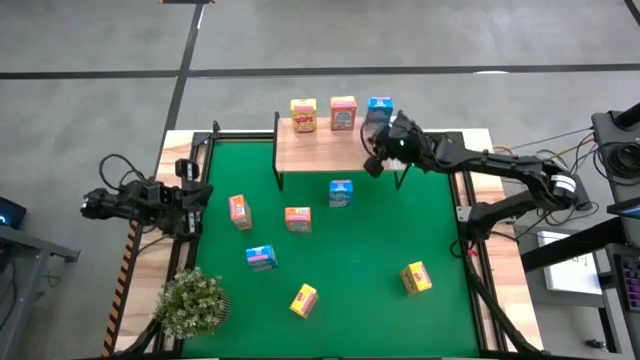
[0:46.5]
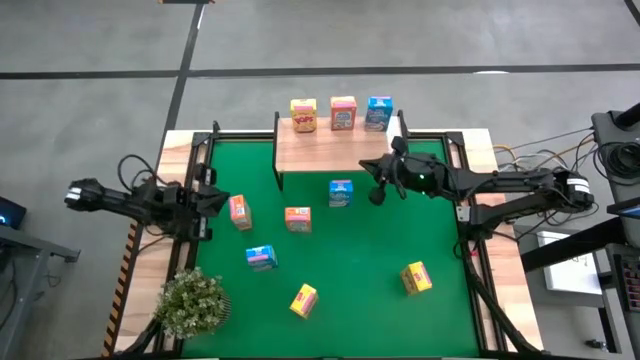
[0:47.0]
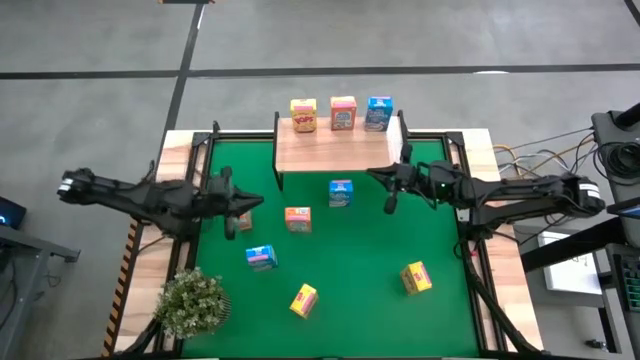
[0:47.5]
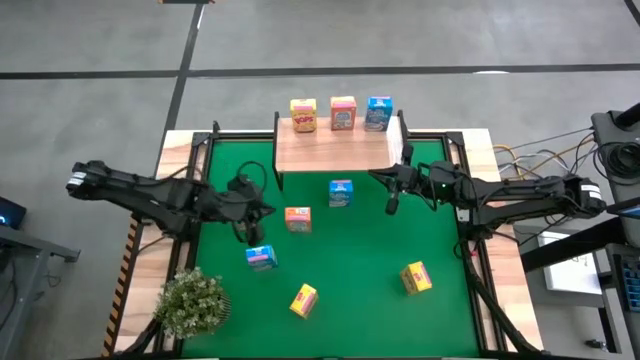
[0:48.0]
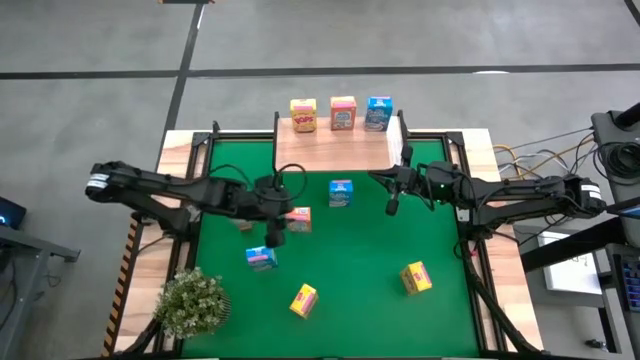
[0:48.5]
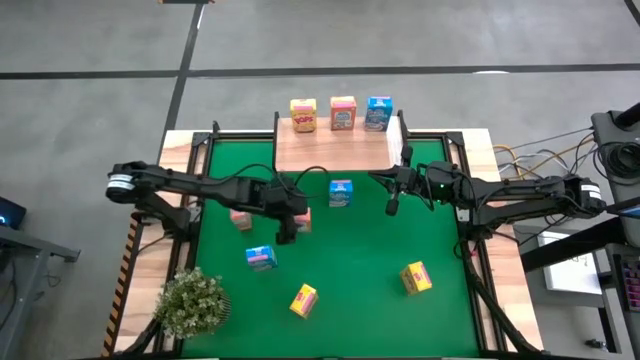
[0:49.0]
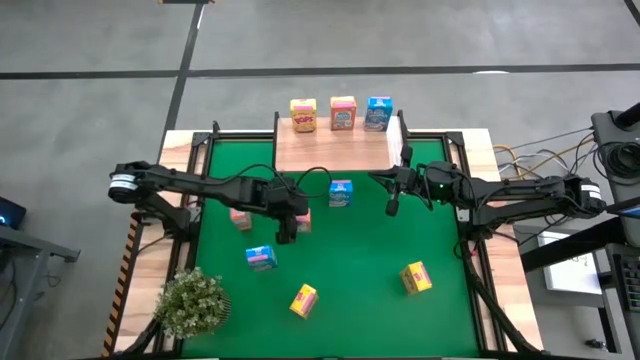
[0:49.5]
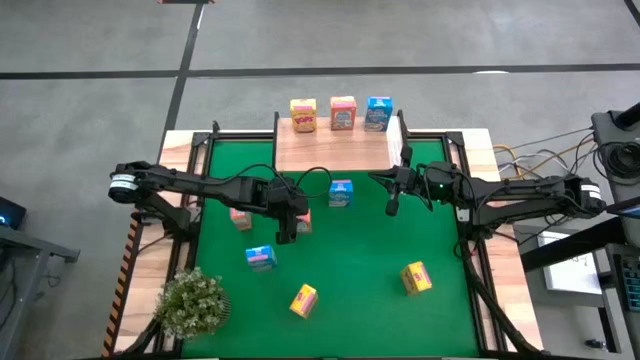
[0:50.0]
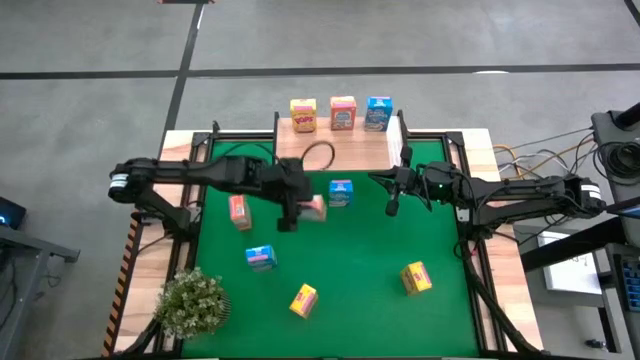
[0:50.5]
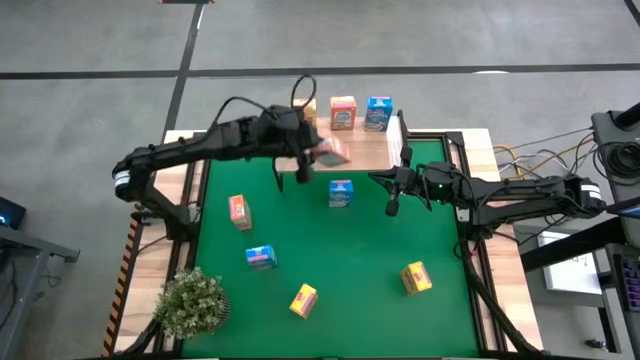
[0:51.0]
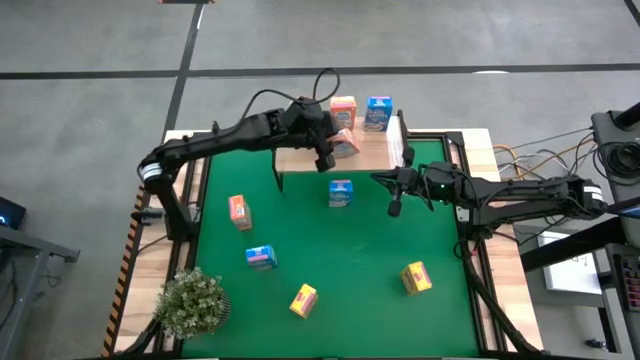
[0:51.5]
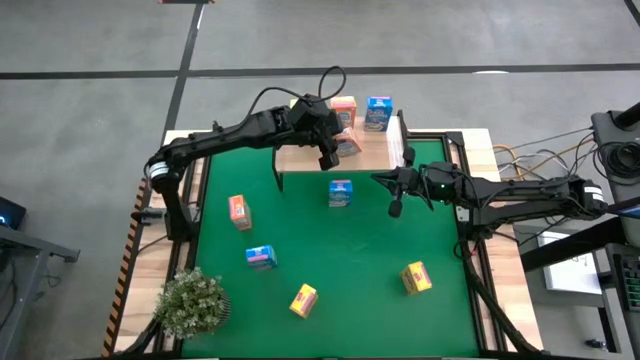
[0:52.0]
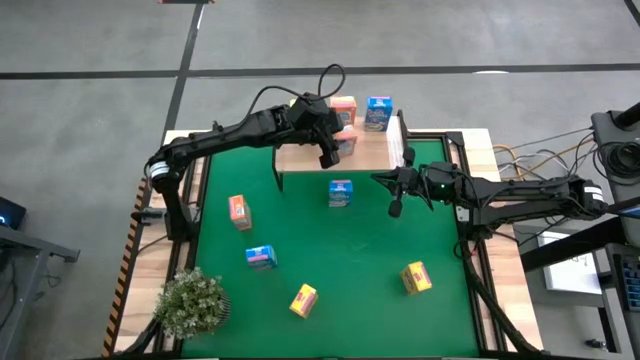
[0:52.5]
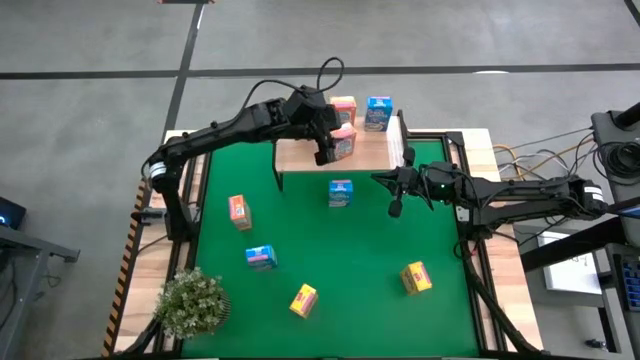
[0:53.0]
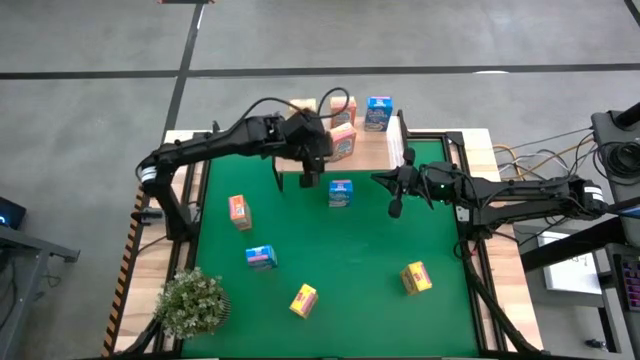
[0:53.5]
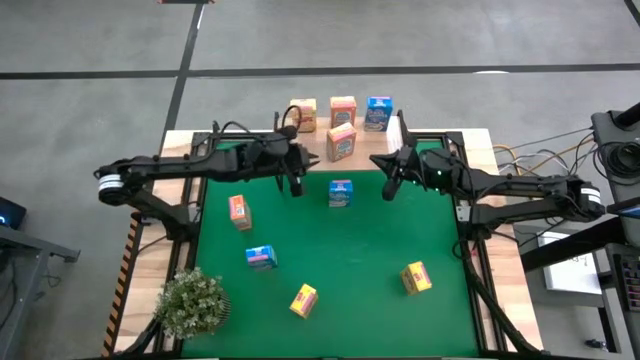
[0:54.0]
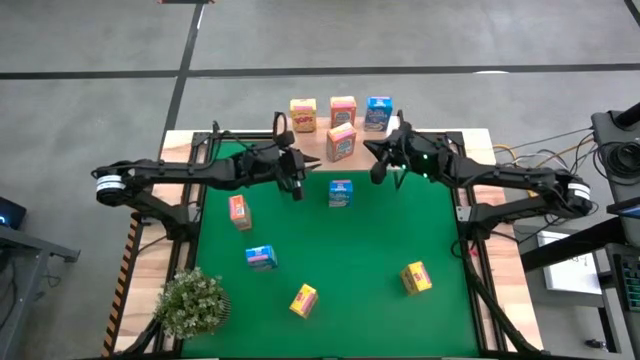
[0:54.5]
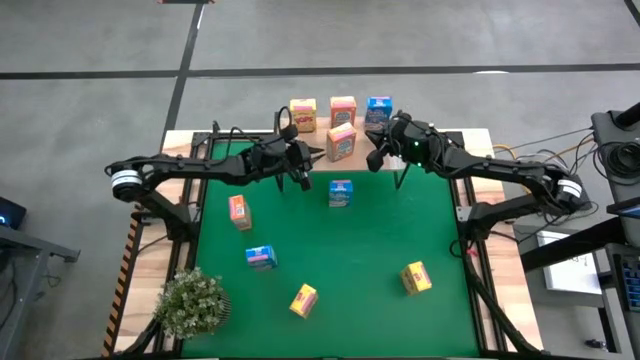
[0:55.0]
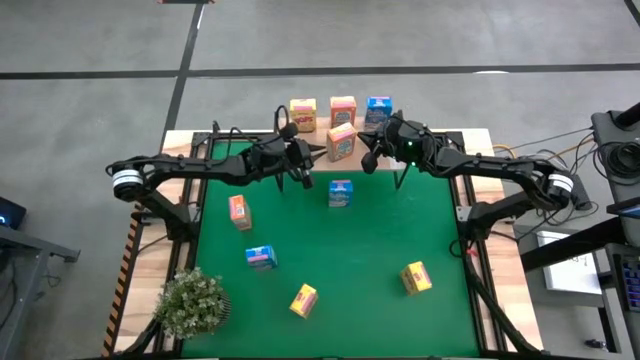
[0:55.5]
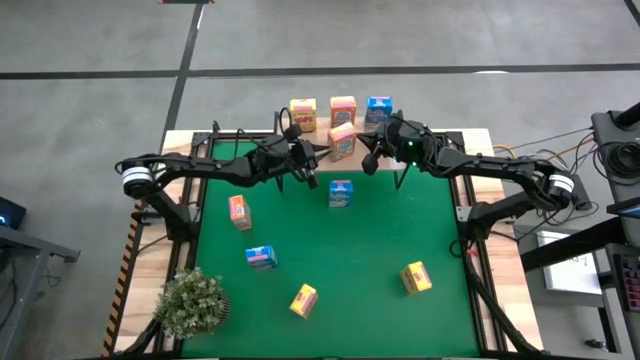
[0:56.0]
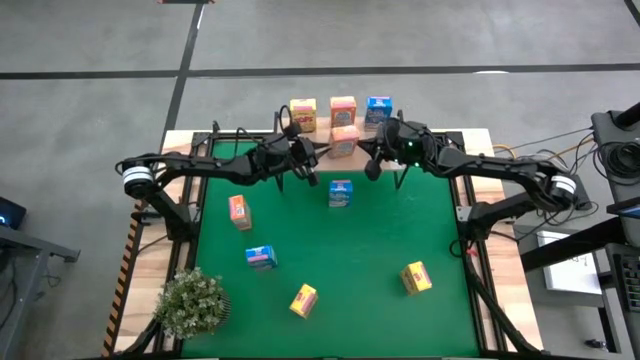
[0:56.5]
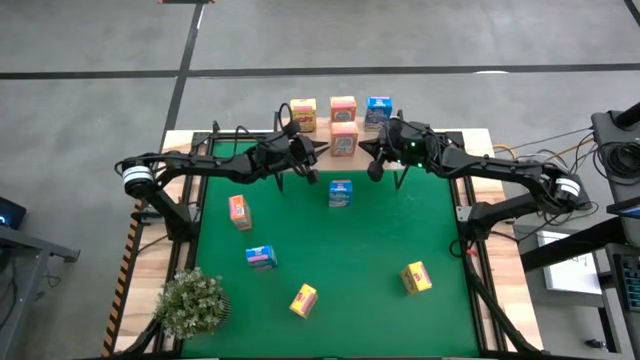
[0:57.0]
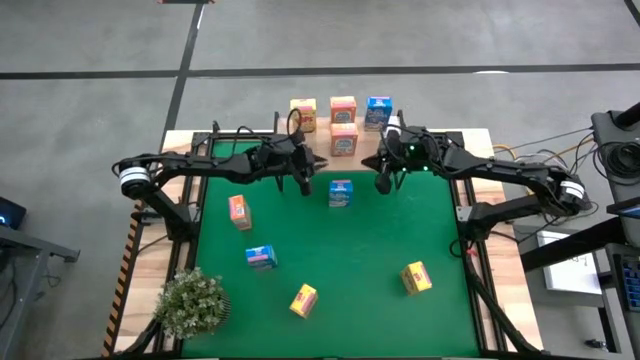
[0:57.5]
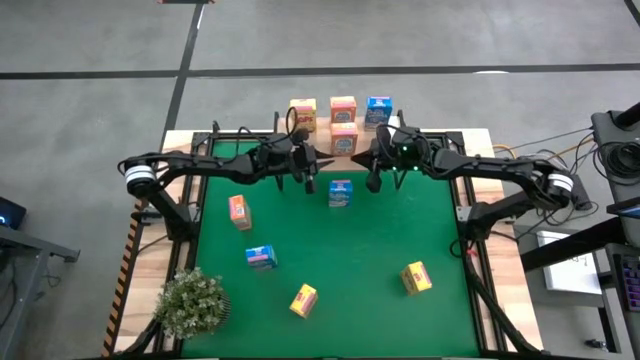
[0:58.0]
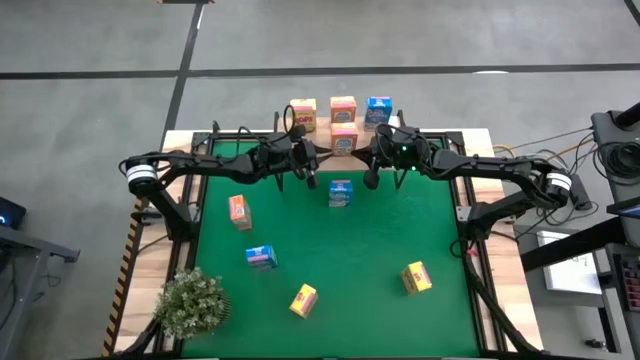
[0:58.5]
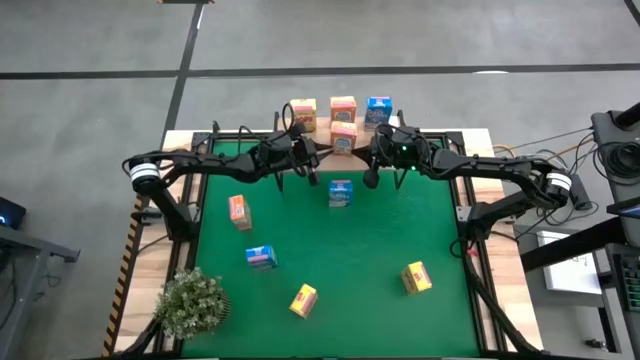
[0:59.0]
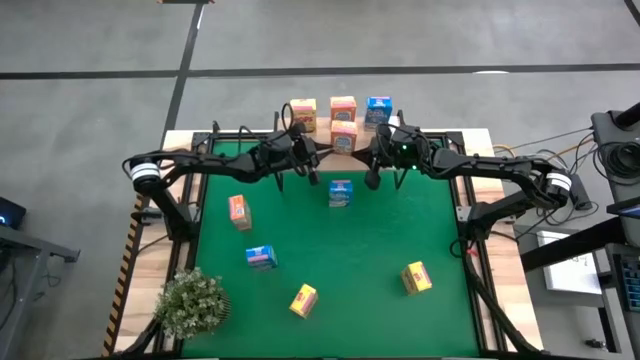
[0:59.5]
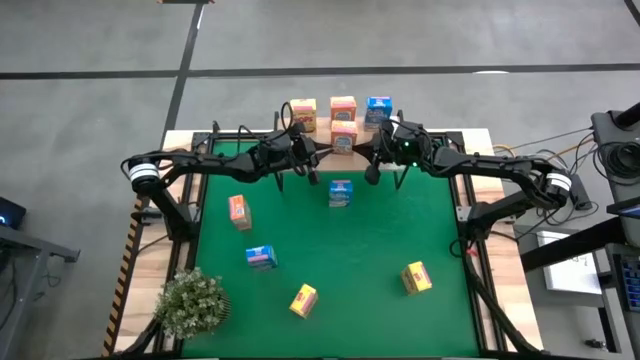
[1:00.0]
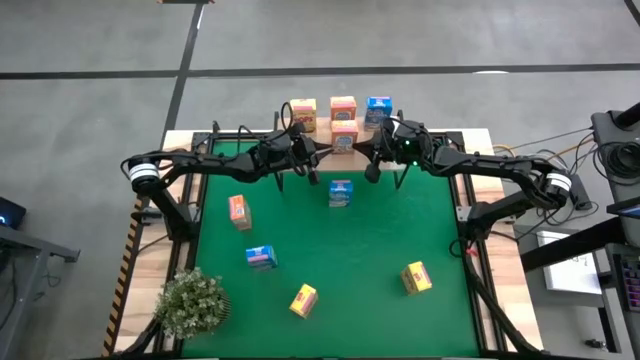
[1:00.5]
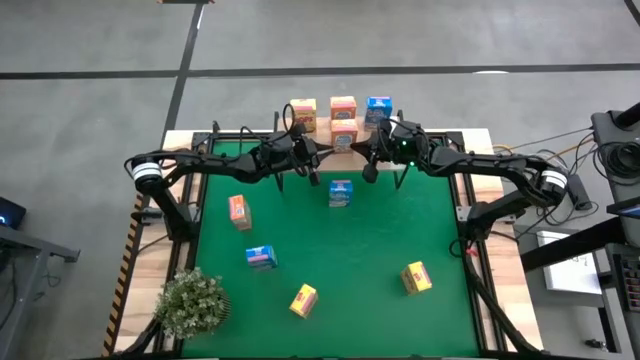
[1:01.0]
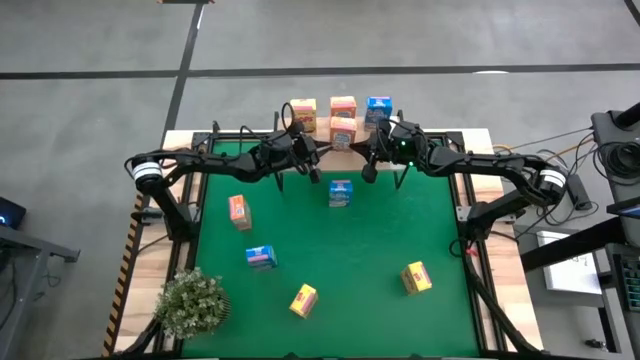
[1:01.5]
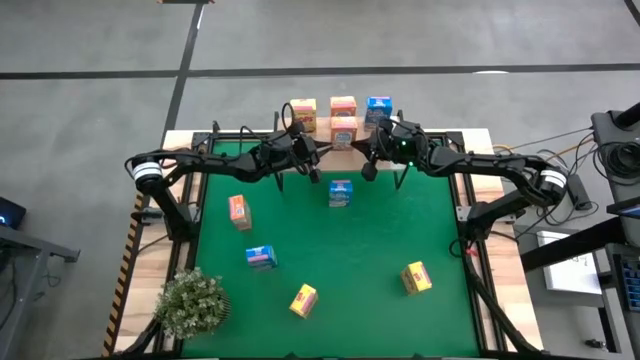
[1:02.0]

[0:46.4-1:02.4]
Task: Stack cereal on shelf
Put the right orange cereal box on the shelf aligned with the other orange cereal box

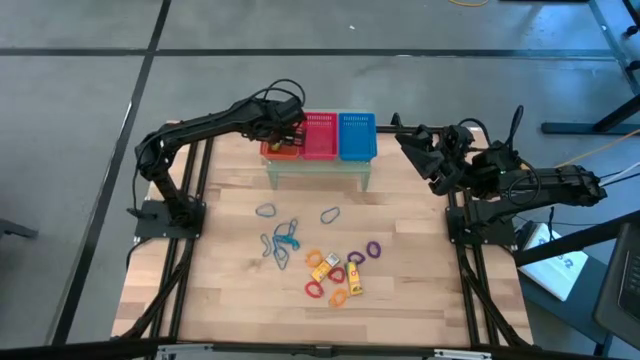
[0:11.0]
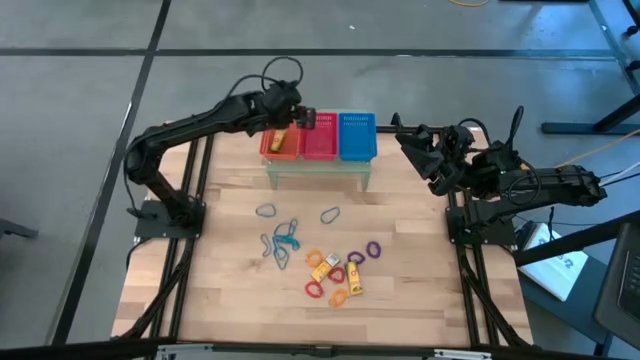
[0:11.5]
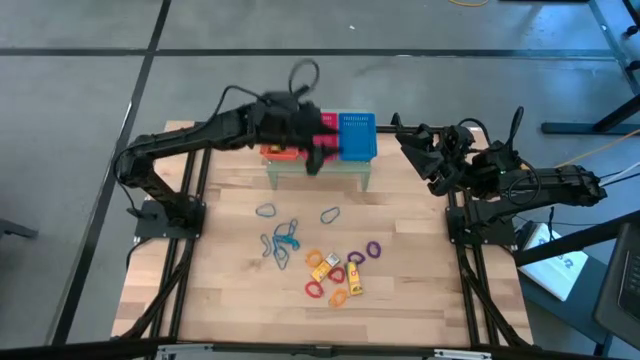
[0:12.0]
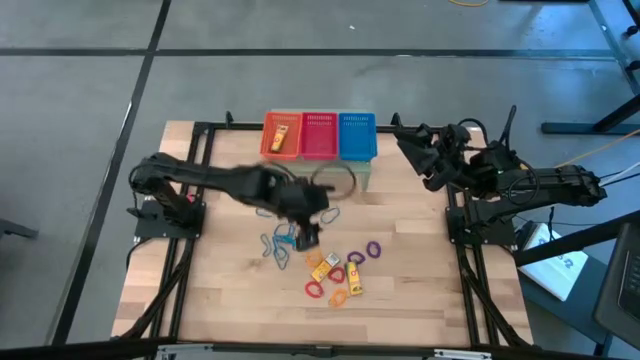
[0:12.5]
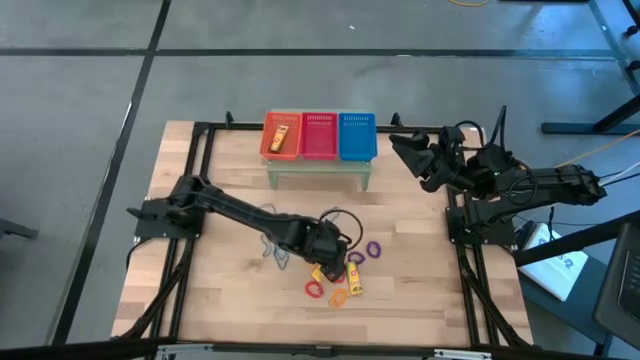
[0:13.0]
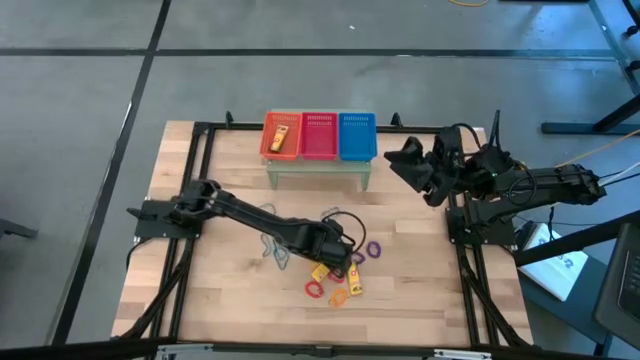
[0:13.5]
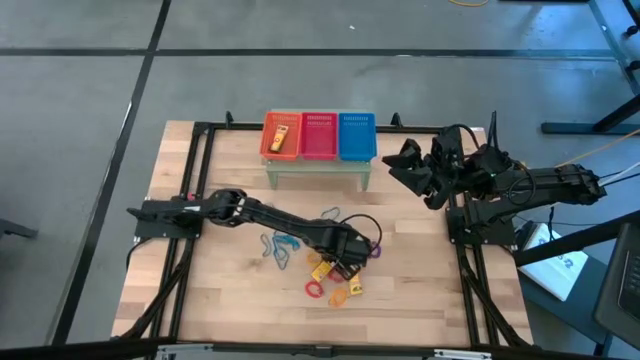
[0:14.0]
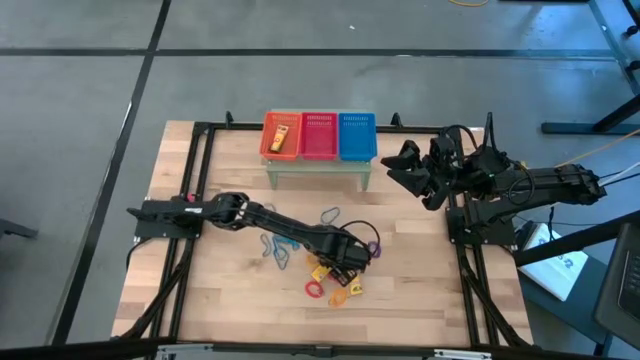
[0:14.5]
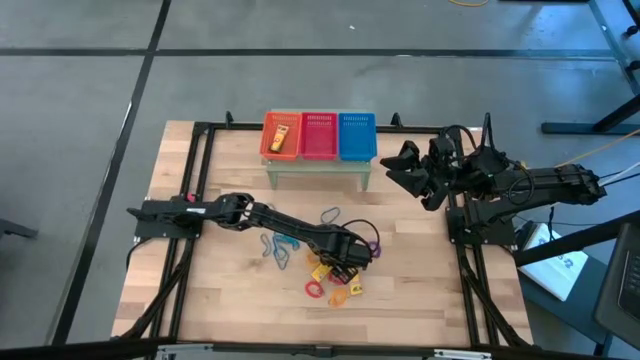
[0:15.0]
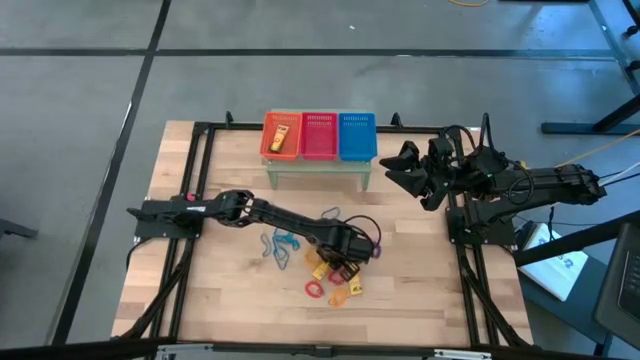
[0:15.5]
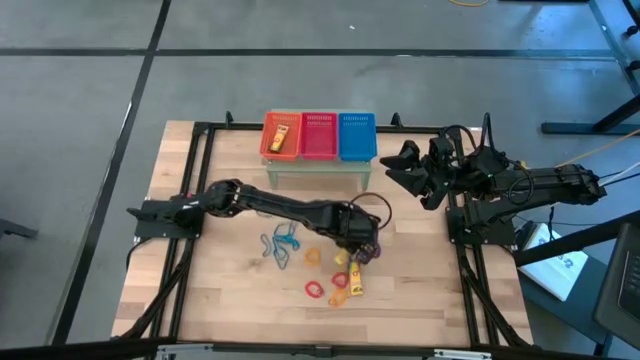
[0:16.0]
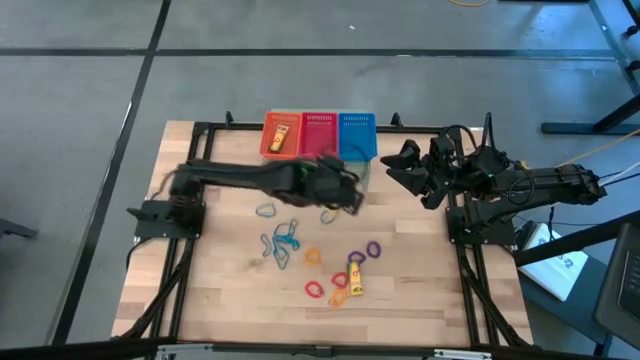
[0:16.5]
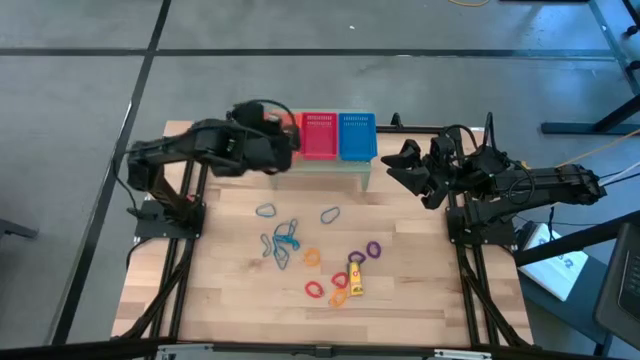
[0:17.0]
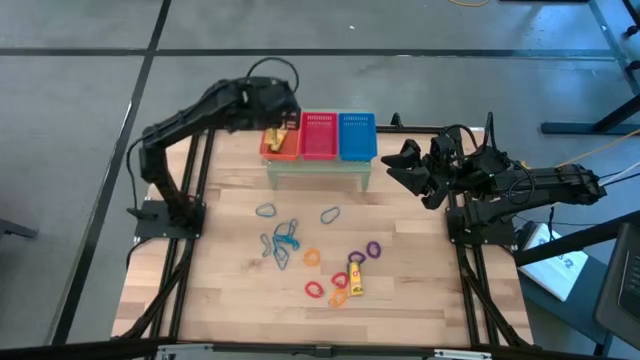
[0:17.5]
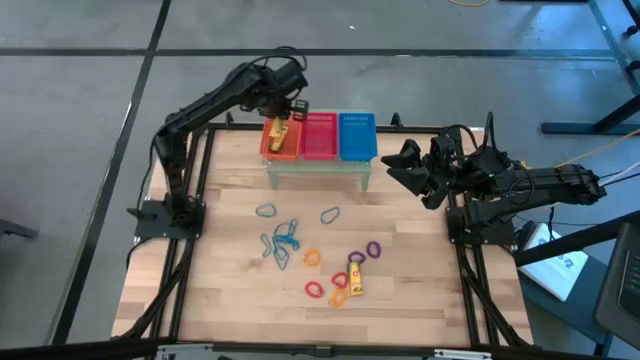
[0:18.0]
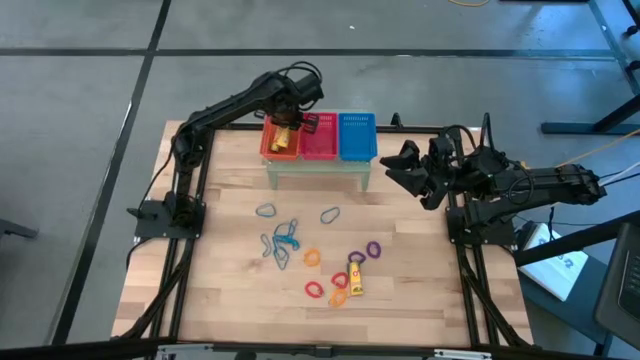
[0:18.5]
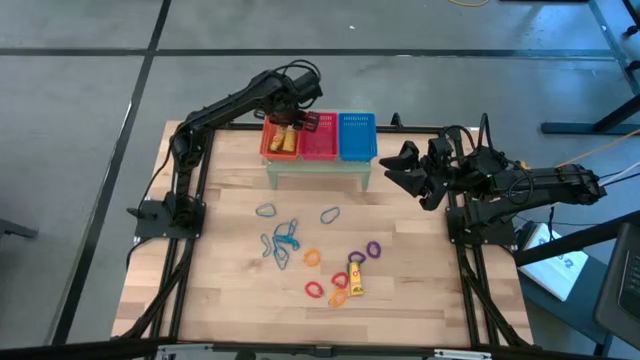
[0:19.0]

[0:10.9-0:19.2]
Task: Pick & Place Office Desk Supplies
Put the yellow box of crayon into the orange bin on the shelf
